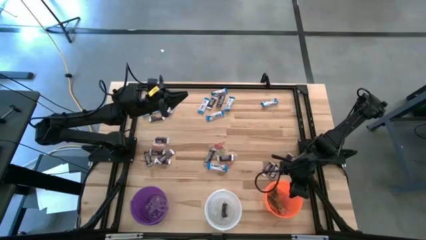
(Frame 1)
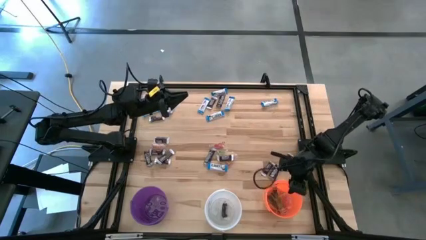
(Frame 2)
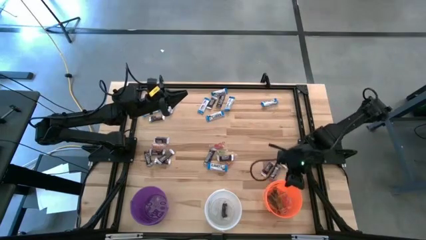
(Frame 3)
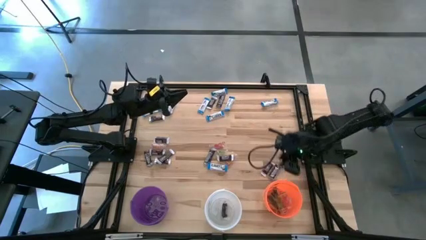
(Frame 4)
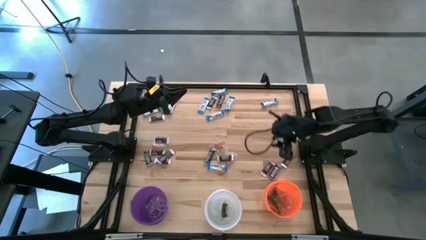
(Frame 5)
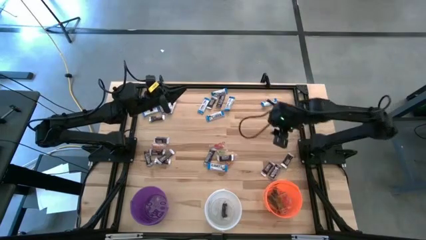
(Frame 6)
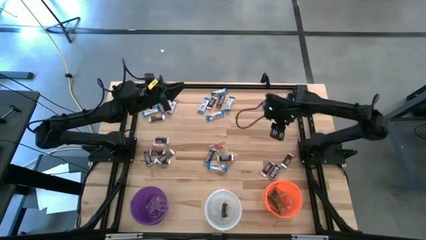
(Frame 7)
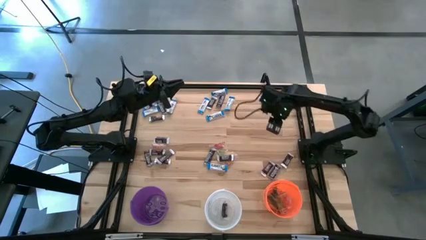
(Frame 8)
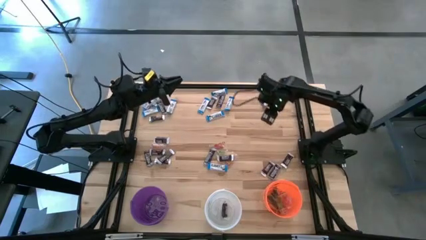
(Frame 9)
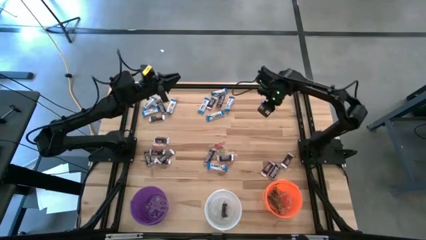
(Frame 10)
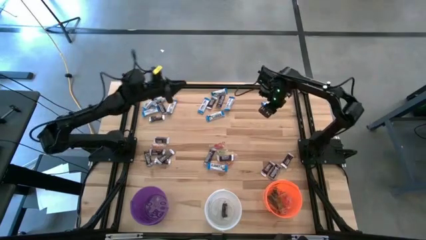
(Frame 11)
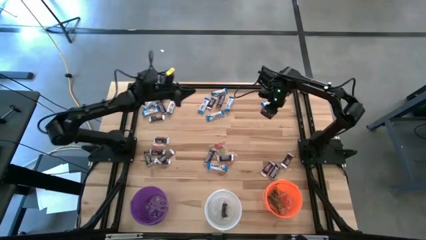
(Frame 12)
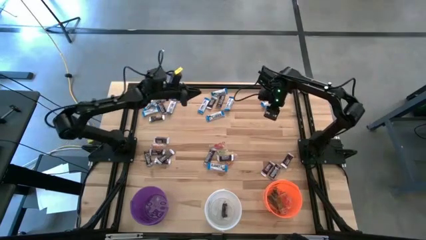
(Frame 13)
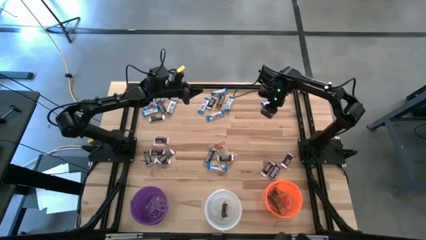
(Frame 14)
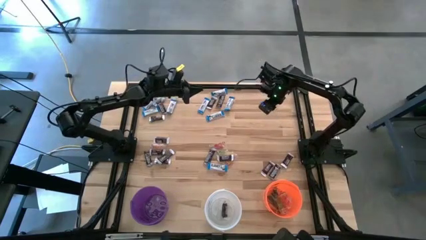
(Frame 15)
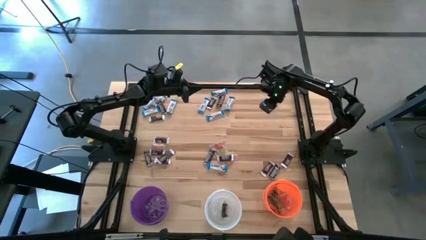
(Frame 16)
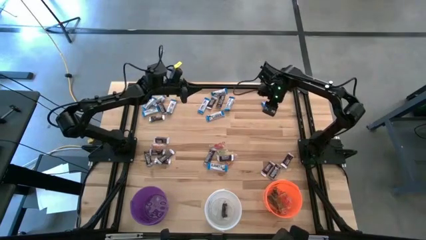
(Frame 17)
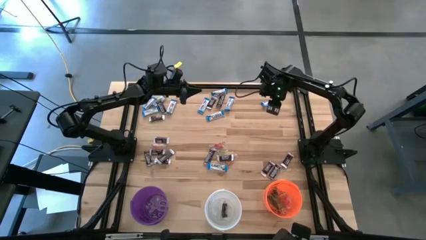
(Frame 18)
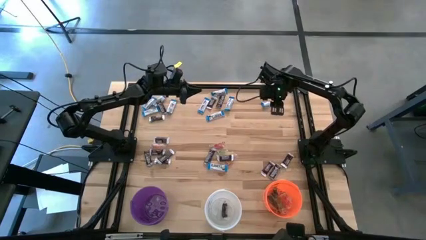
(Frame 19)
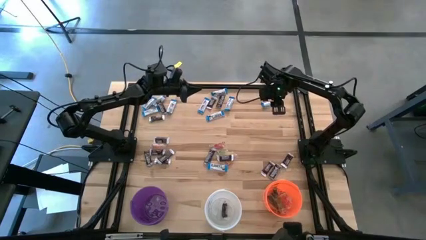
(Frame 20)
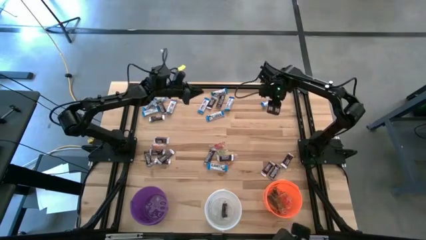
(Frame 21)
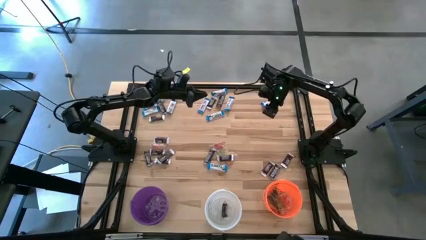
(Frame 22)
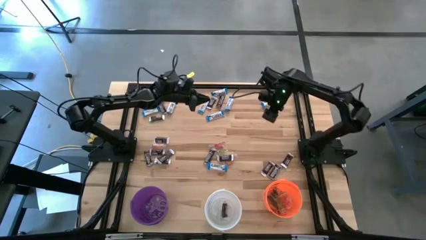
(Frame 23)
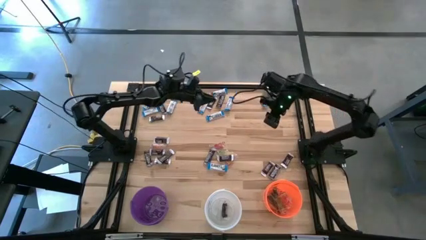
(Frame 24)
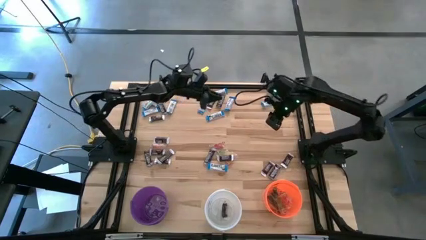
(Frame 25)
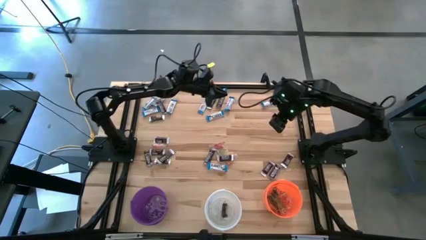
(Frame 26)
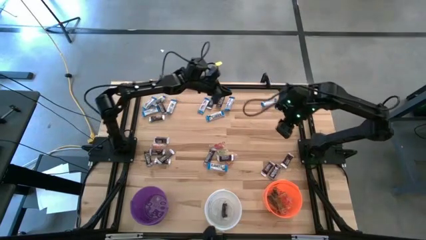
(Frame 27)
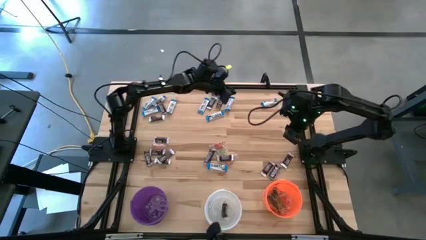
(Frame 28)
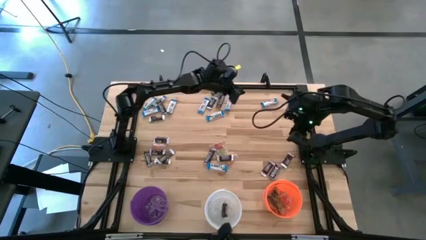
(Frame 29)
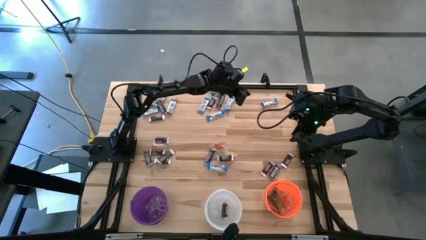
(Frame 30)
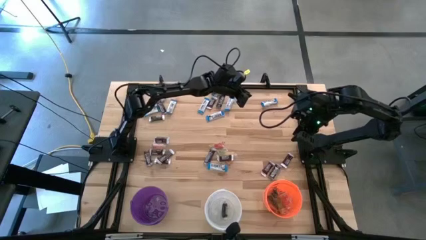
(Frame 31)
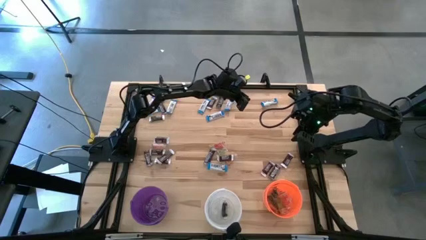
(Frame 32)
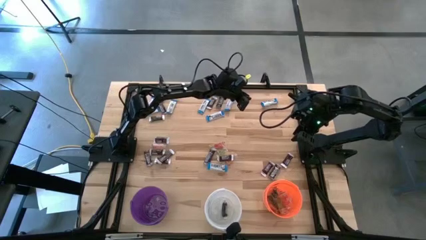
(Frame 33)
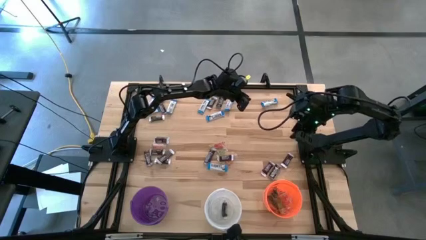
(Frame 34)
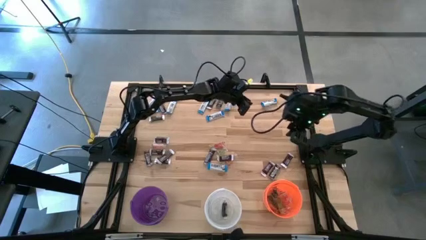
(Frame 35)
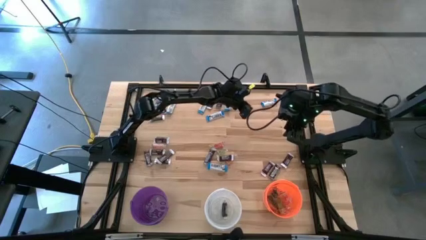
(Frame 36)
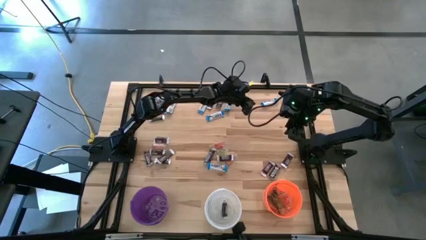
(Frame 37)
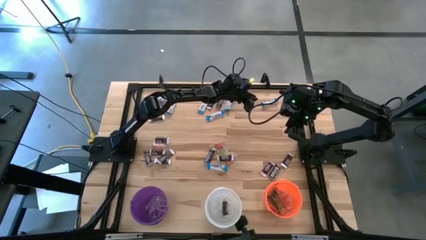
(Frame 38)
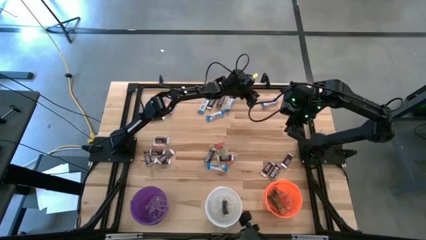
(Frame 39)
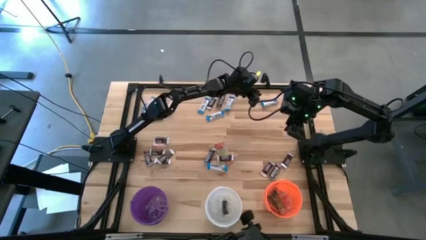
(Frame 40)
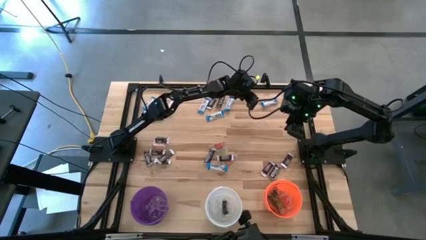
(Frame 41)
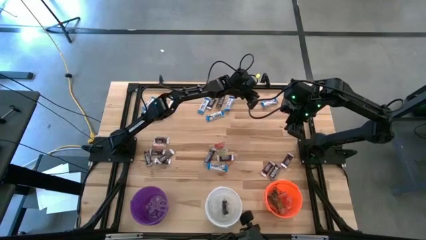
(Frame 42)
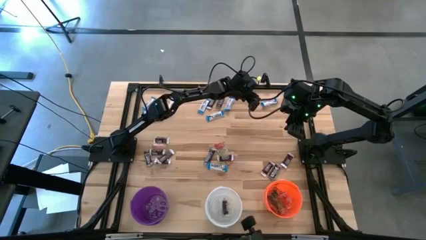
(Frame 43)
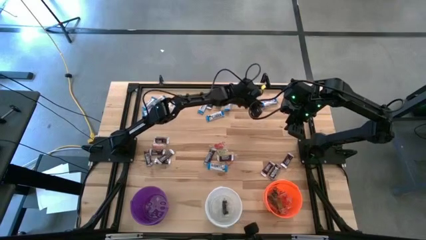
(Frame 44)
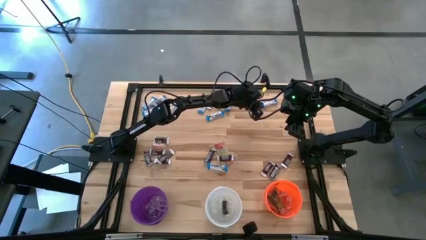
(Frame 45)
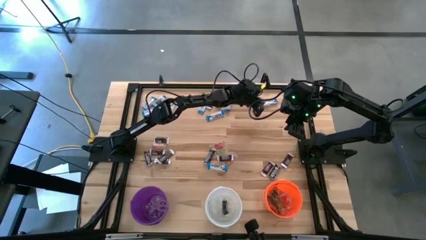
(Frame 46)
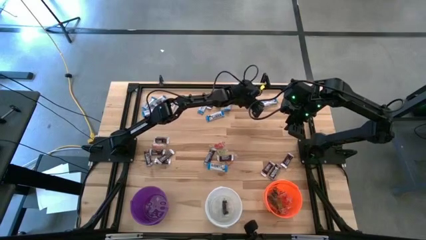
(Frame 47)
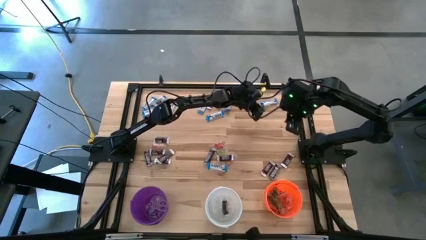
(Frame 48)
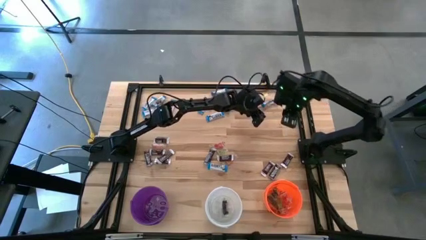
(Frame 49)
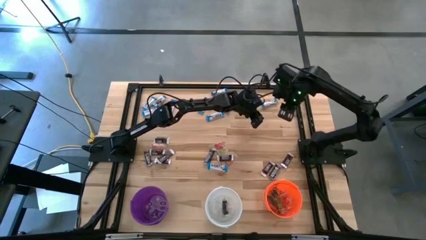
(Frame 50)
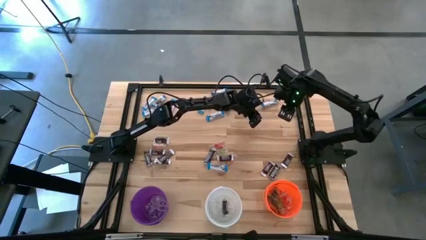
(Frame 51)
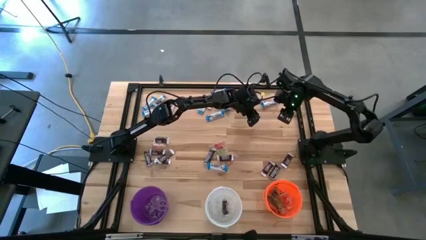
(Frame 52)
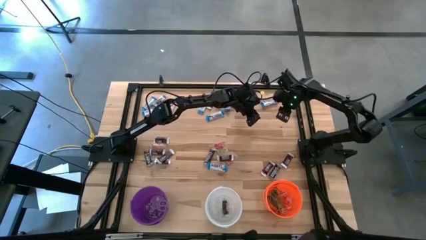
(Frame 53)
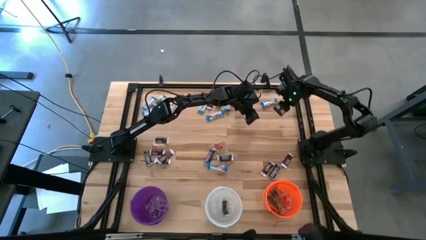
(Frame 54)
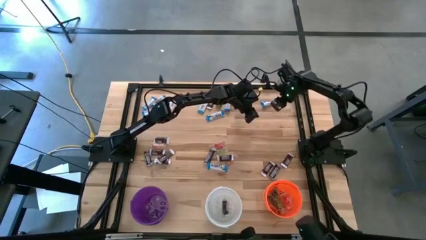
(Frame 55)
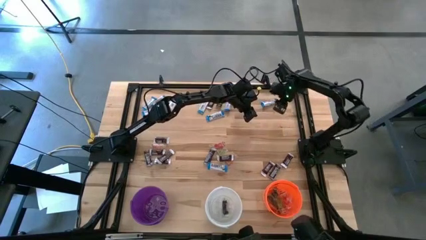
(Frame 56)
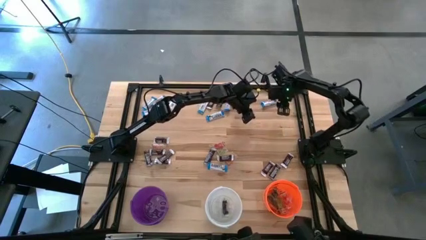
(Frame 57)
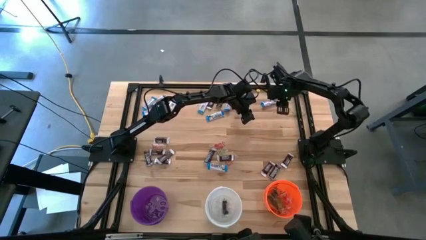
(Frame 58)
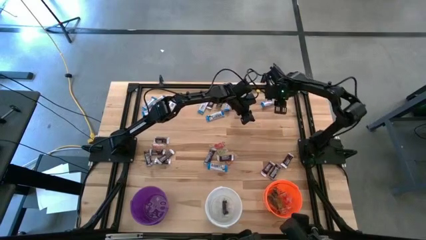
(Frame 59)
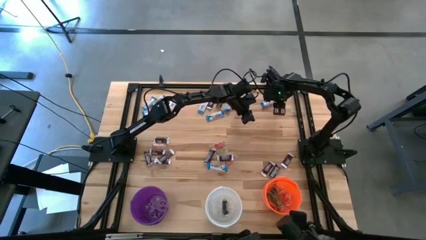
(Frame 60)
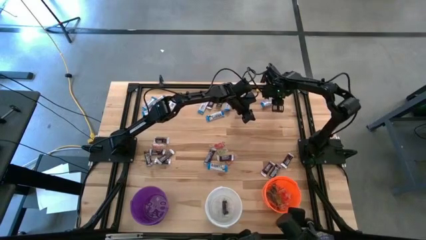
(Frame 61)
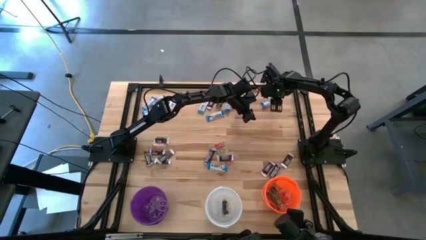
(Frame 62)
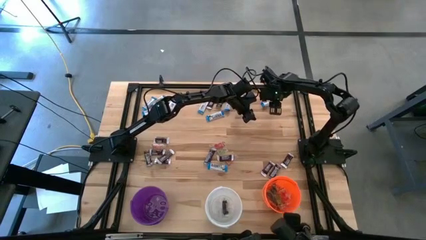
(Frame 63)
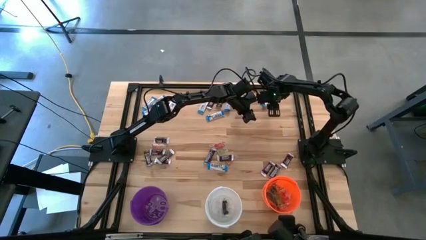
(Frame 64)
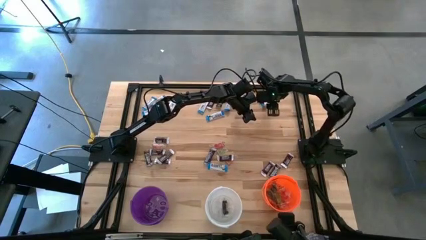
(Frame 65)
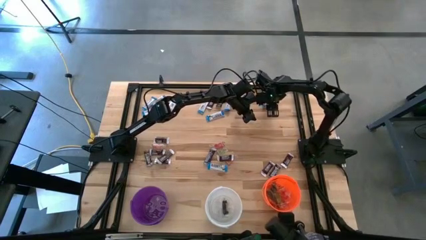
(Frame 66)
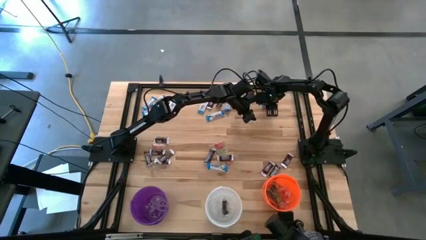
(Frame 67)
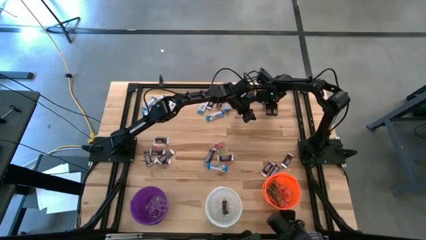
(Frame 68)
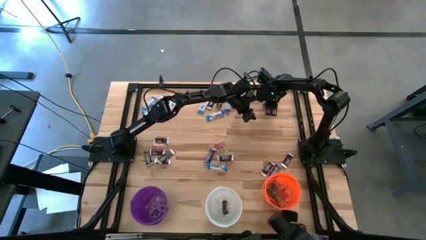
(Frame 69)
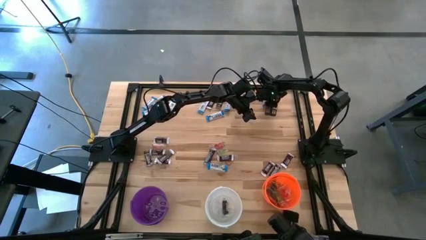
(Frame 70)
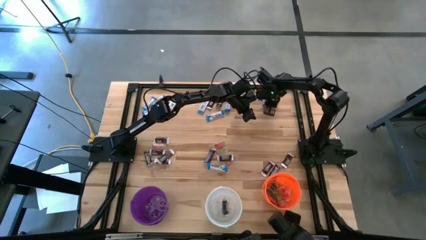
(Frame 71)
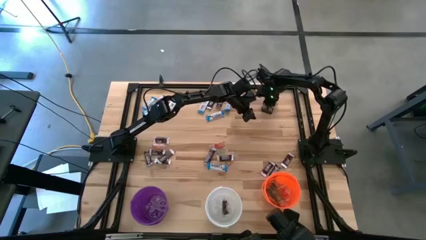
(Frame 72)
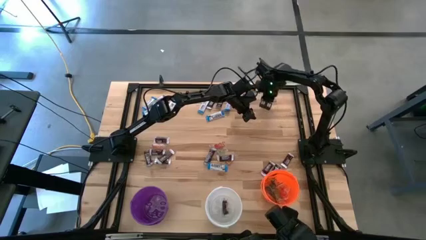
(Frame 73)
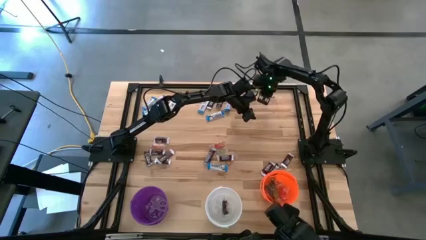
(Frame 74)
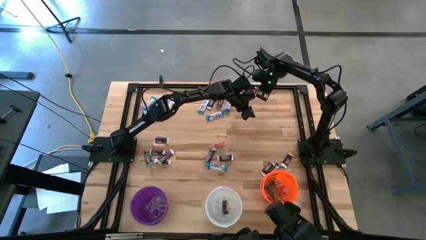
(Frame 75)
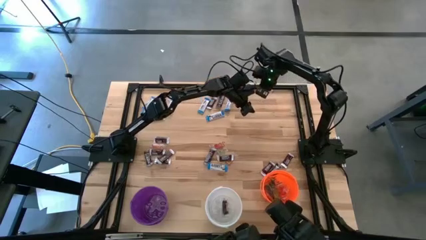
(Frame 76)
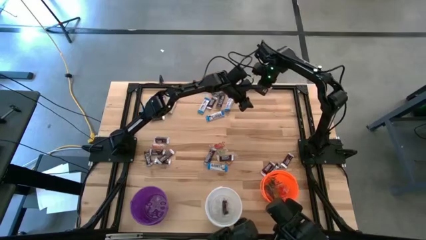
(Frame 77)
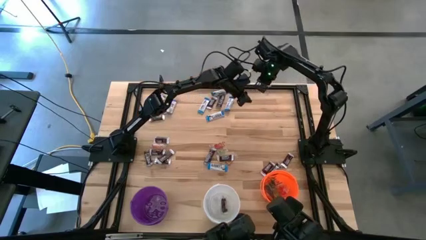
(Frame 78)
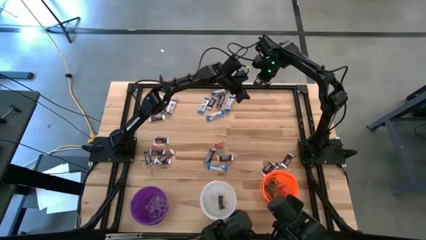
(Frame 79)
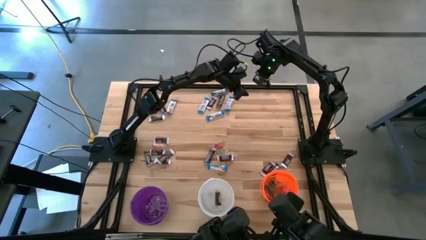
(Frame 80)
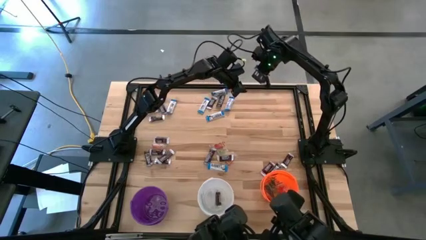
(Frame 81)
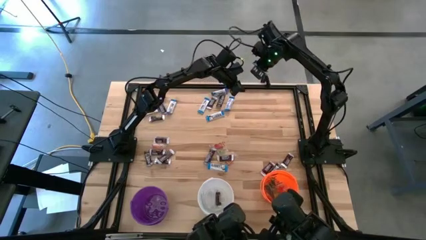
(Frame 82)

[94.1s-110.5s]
Task: Sort candy
Put the white chocolate into the violet bucket
